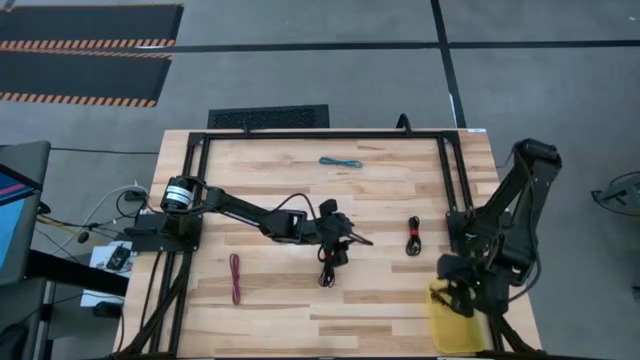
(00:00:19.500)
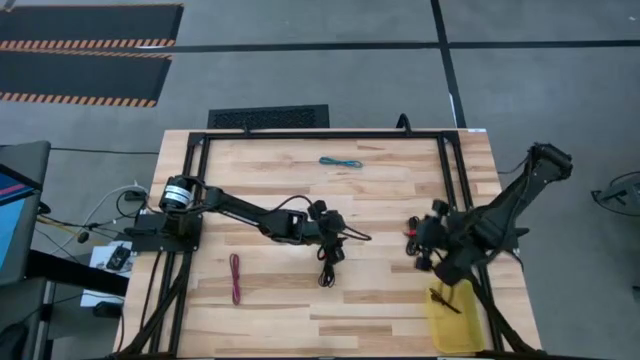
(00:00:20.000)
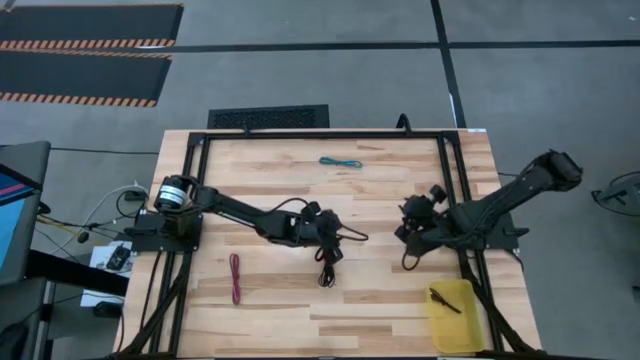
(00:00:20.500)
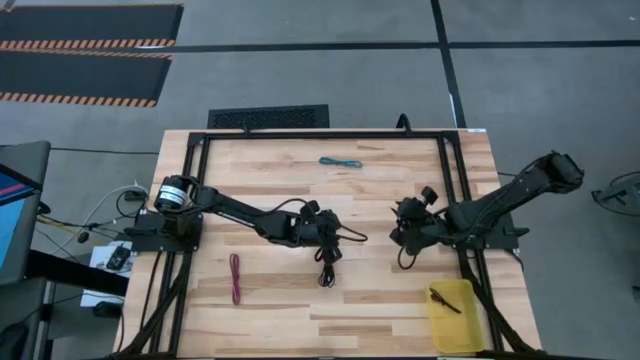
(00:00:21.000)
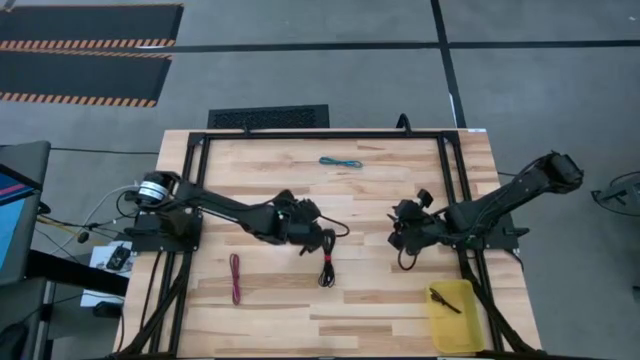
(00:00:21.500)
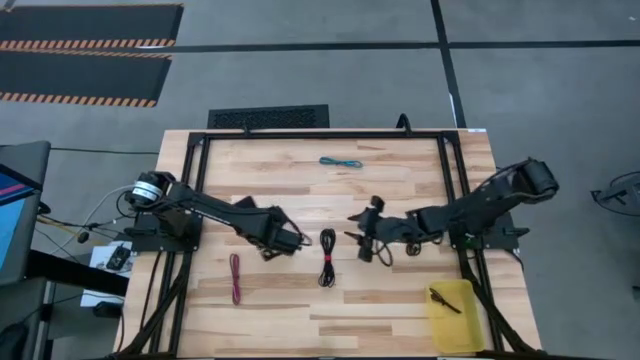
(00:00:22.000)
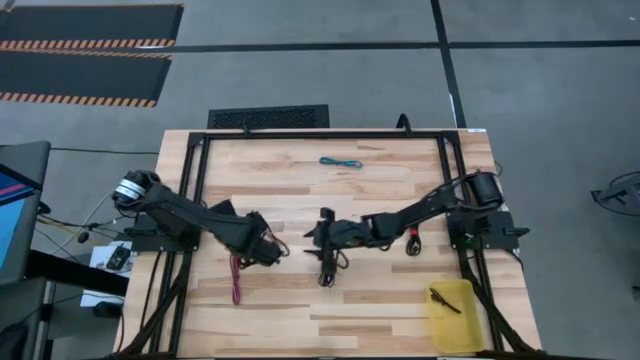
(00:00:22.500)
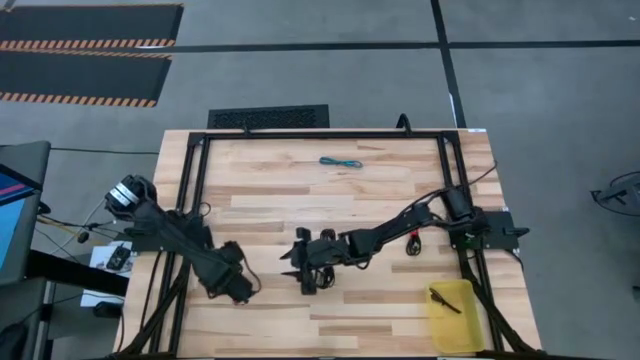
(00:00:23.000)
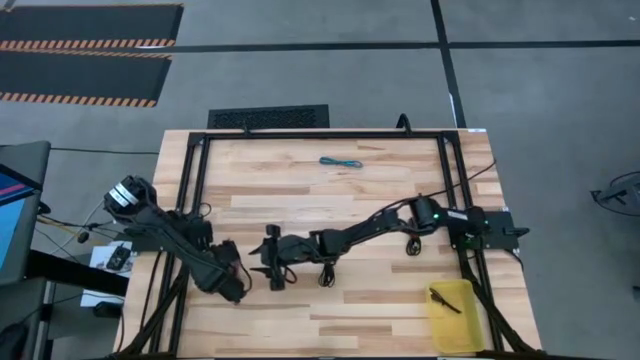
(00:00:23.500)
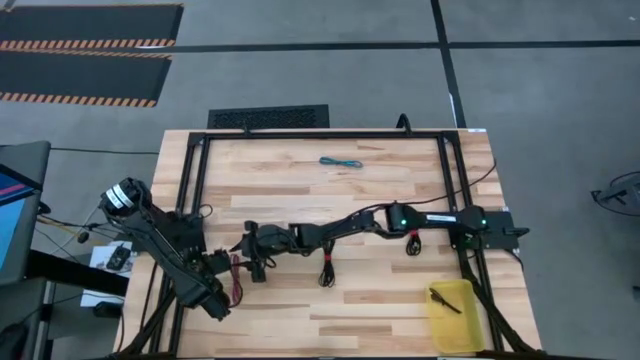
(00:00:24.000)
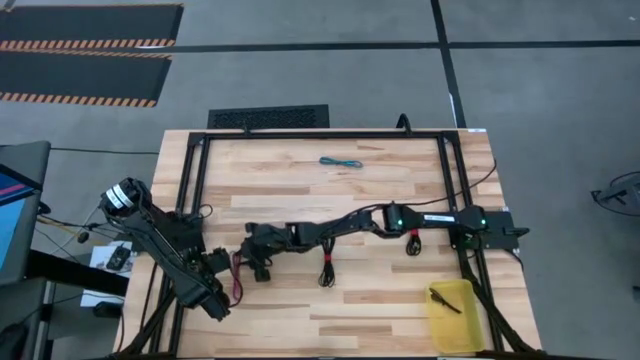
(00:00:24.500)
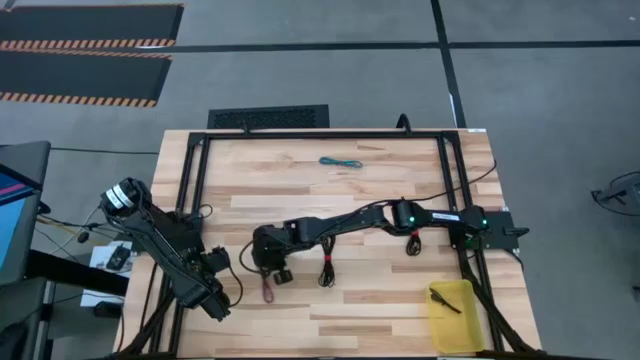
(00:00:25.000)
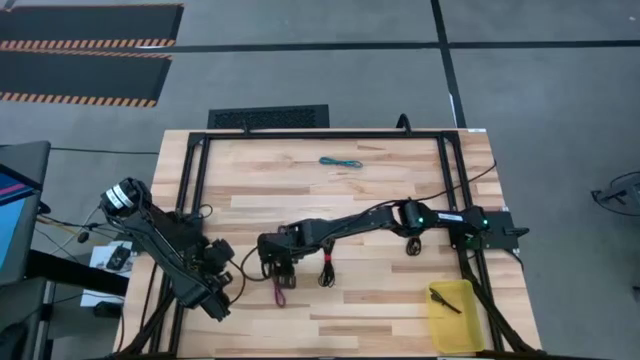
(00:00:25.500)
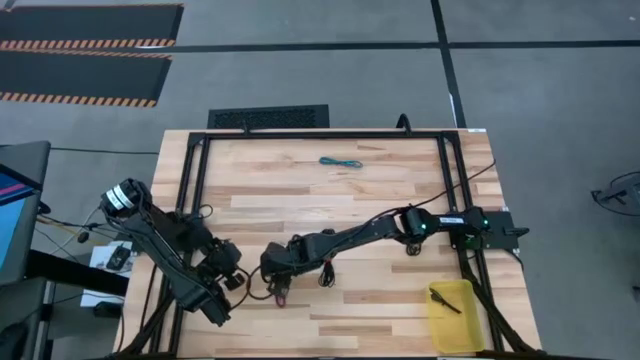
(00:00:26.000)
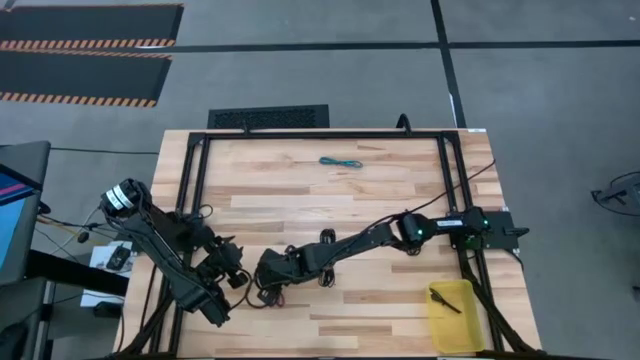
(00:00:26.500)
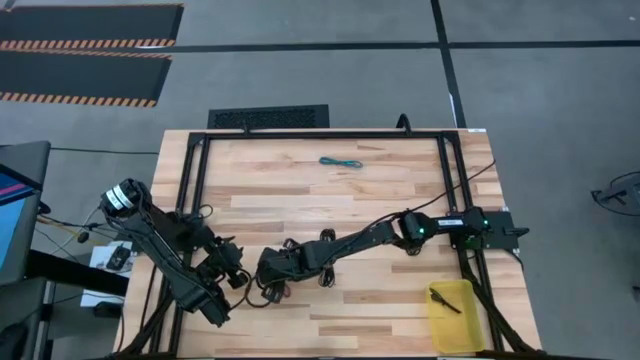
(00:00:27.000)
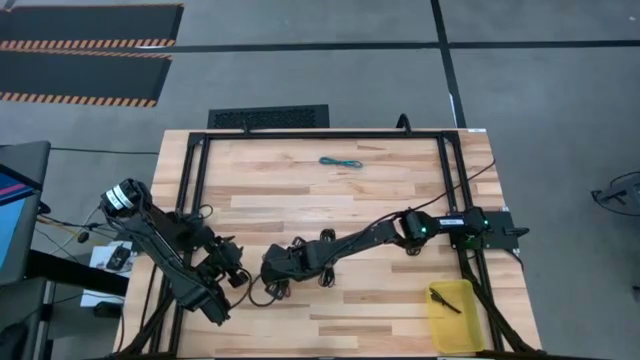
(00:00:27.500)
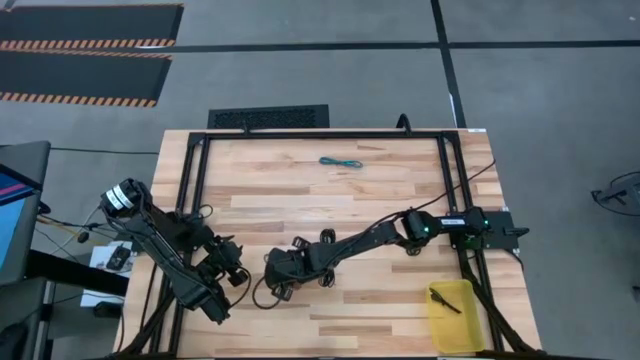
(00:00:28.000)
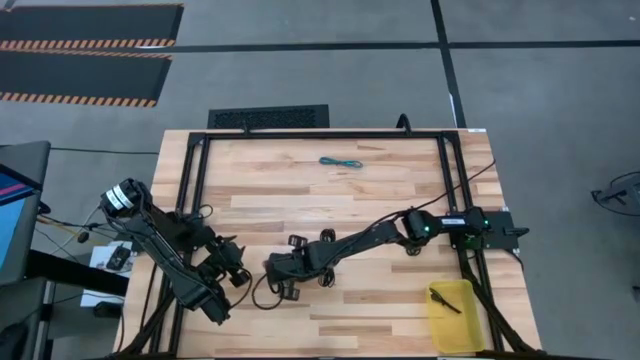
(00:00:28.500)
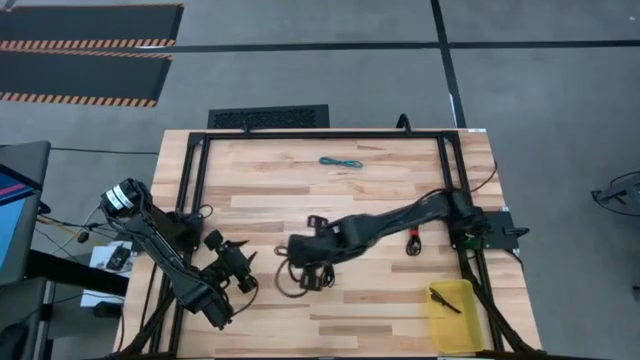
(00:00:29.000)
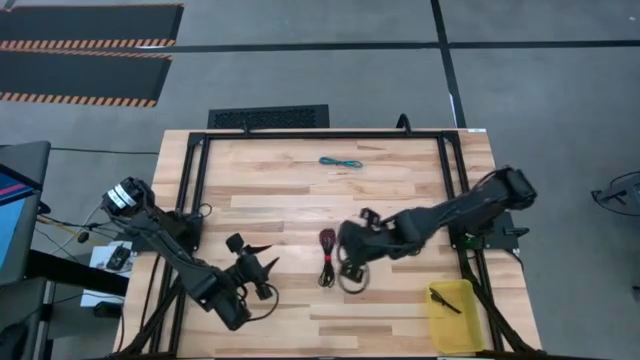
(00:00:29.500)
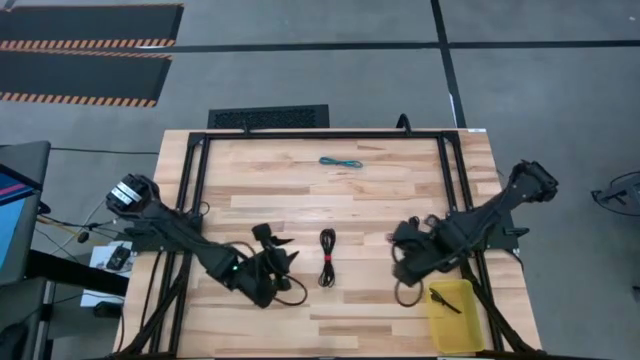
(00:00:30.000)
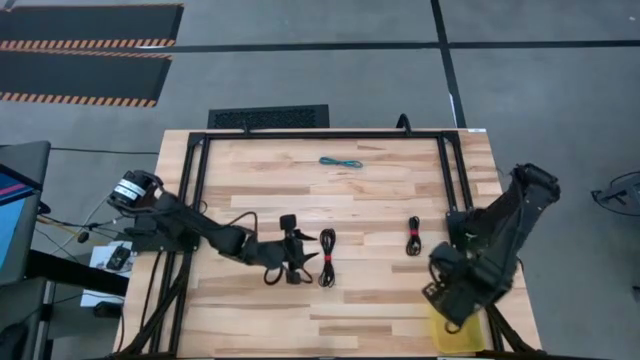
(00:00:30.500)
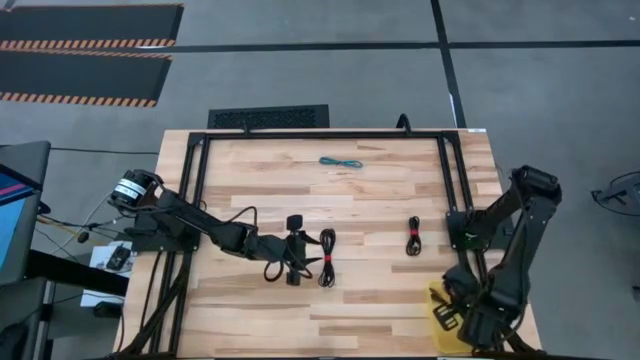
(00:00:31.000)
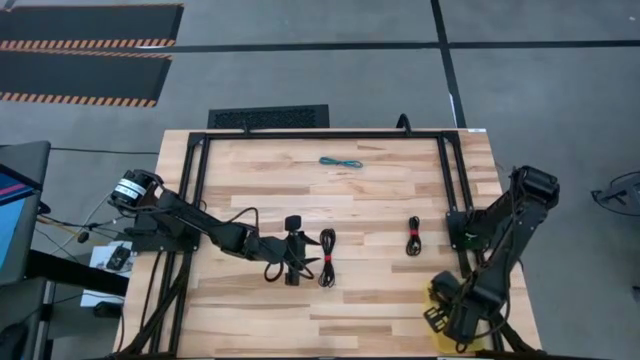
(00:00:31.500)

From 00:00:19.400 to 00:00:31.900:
Task: Pick and place USB-C Cables
Put the pink charger cable into the yellow bin

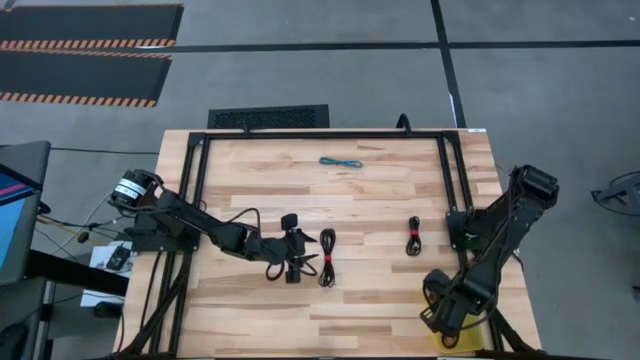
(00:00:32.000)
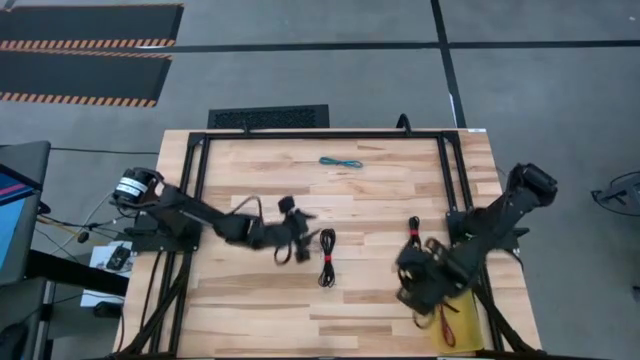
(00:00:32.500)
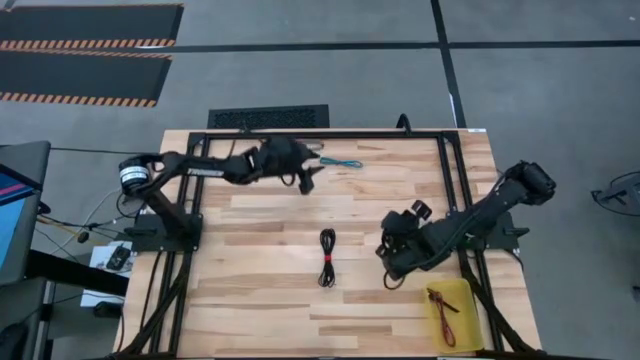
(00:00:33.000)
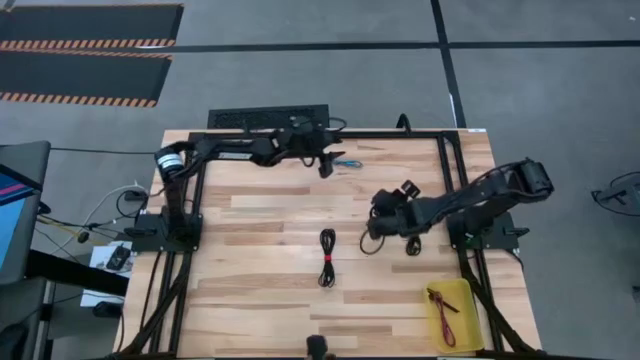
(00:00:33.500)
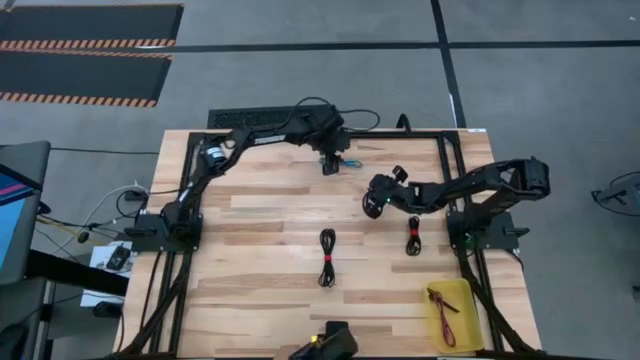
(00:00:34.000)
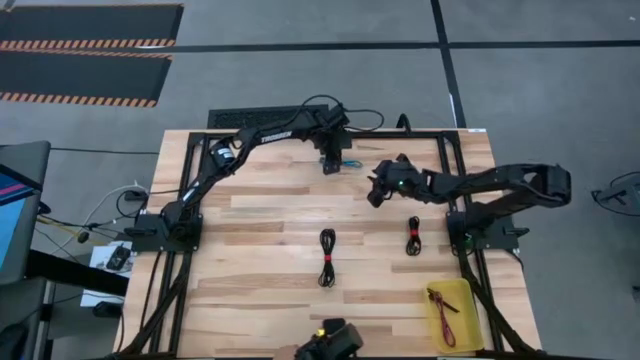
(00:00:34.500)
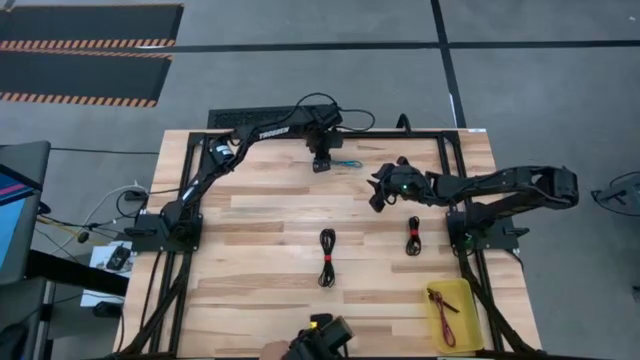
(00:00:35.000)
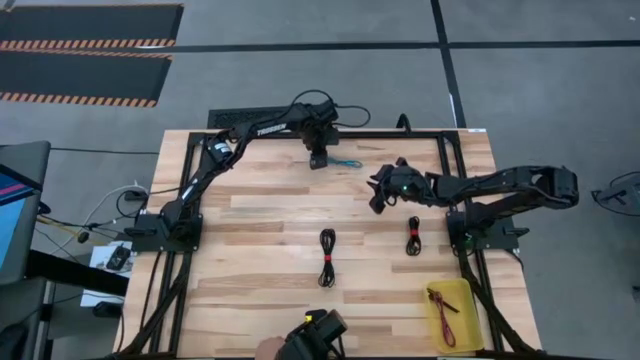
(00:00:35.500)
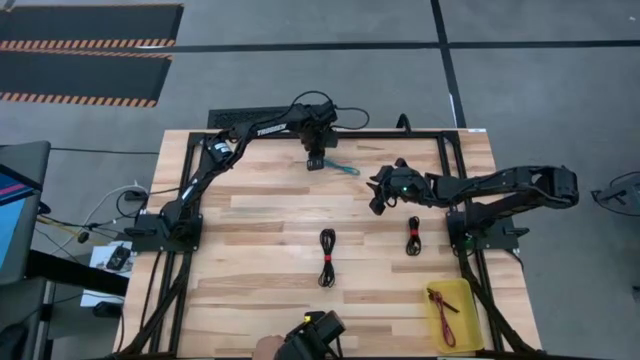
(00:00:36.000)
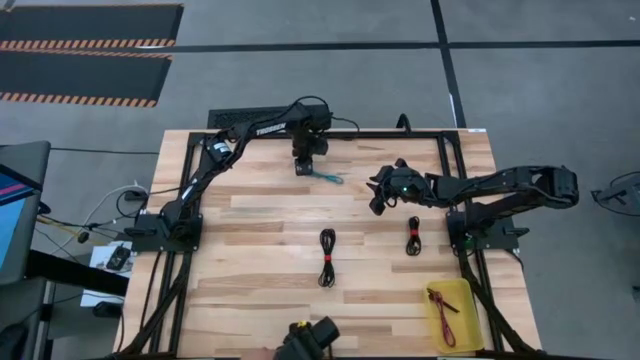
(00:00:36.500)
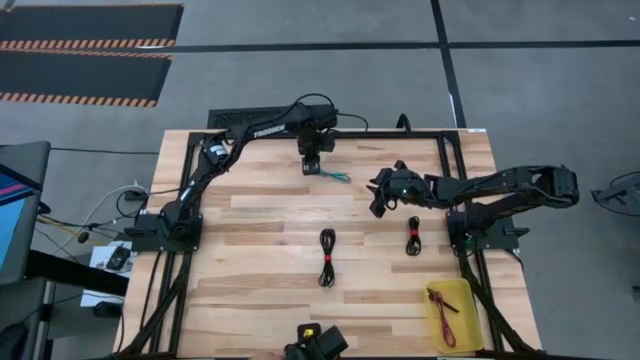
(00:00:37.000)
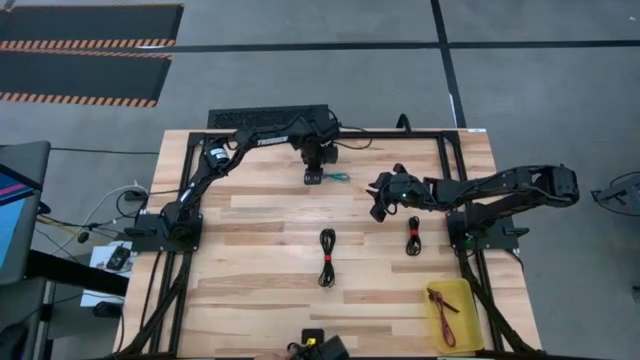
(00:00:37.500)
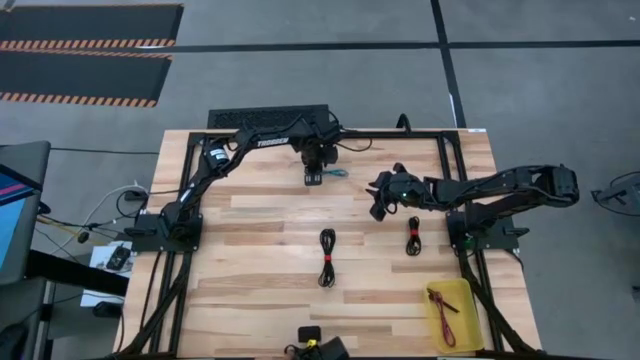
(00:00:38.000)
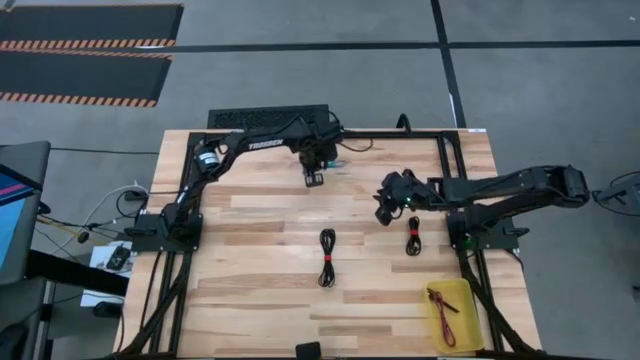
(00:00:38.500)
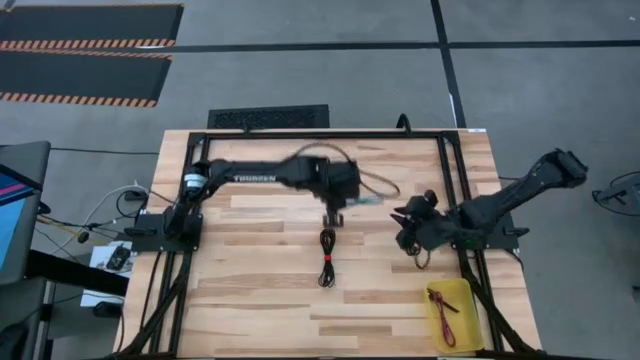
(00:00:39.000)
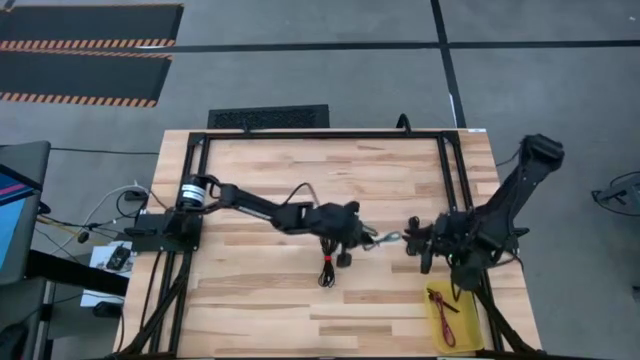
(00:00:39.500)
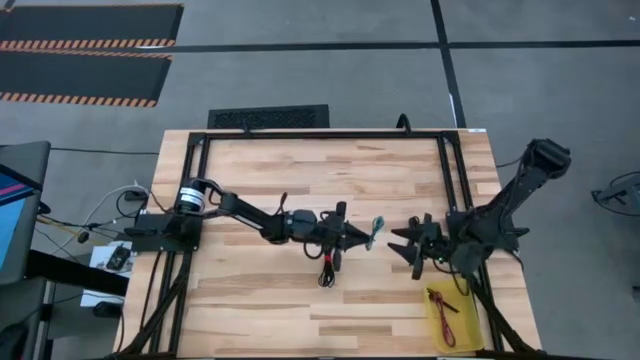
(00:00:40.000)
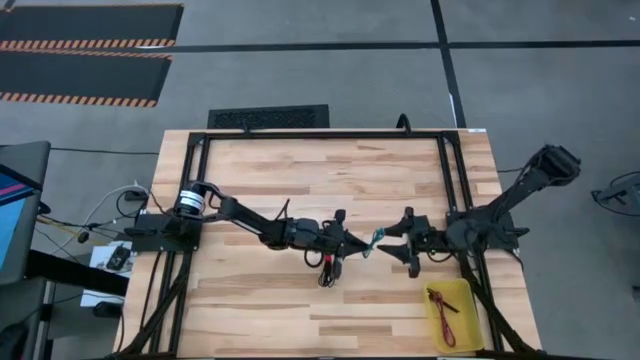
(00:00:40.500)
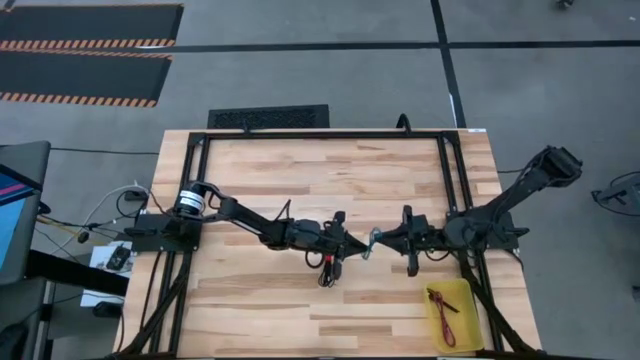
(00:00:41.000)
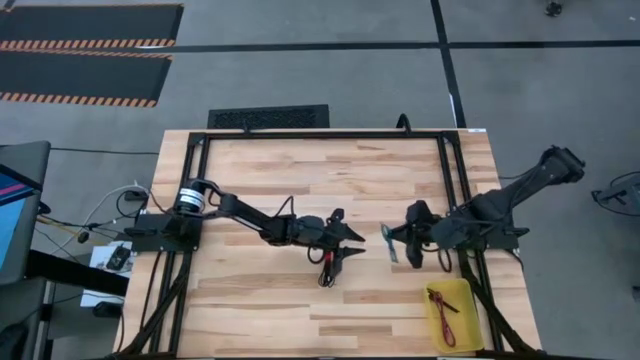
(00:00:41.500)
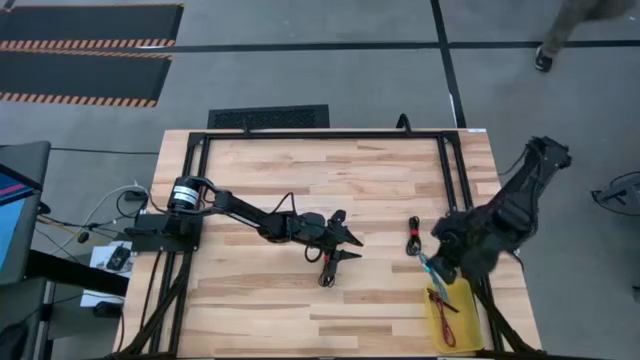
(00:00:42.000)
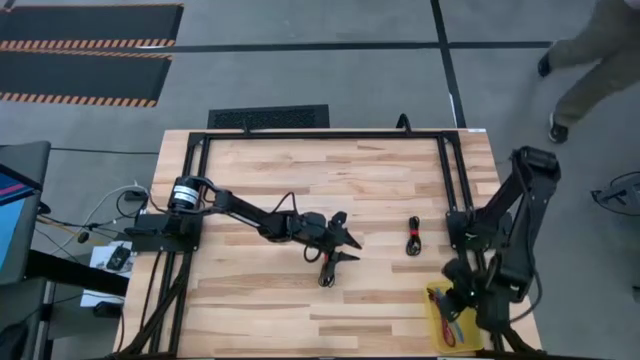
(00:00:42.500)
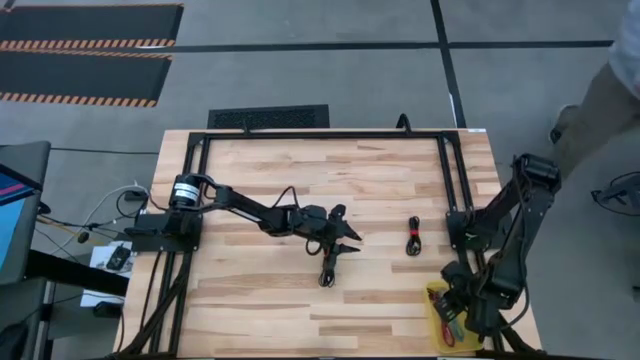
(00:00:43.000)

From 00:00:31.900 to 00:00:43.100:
Put the blue charger cable into the yellow bin
